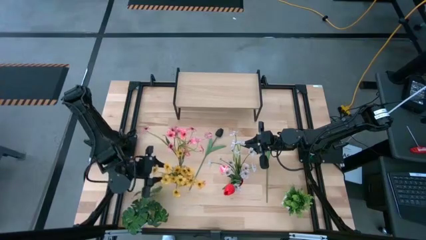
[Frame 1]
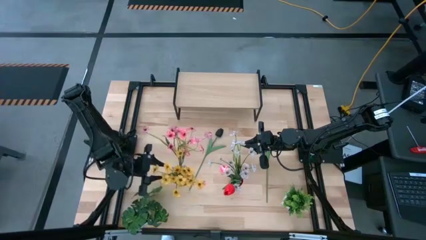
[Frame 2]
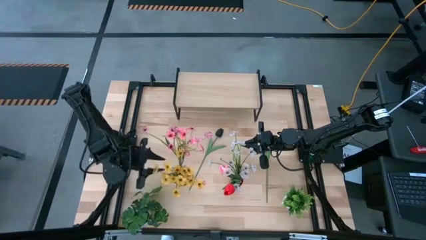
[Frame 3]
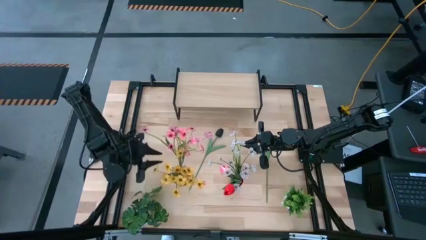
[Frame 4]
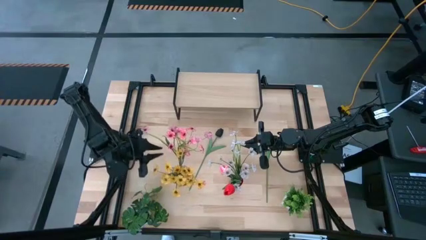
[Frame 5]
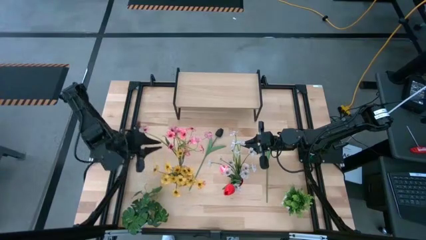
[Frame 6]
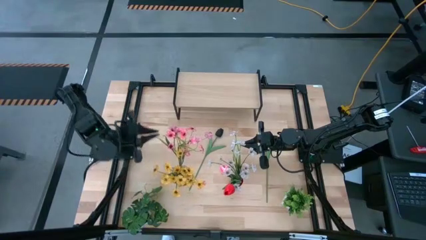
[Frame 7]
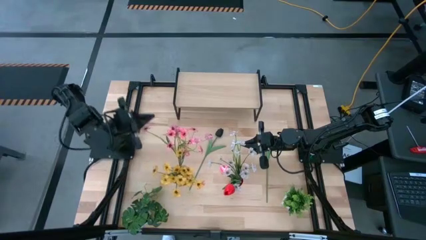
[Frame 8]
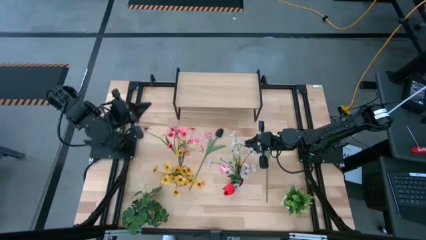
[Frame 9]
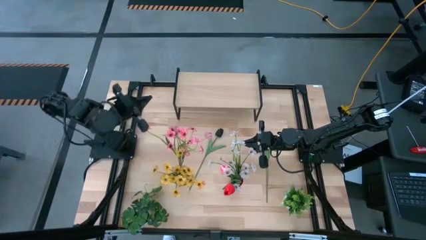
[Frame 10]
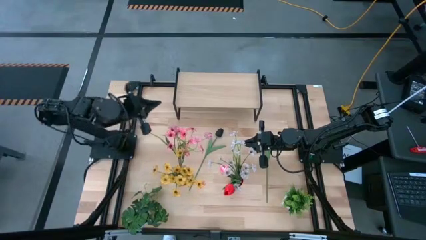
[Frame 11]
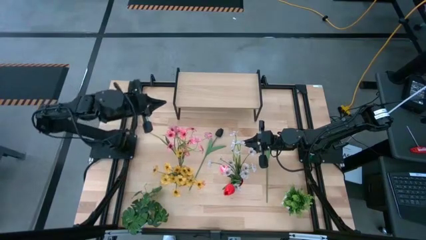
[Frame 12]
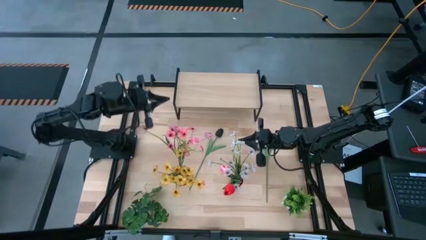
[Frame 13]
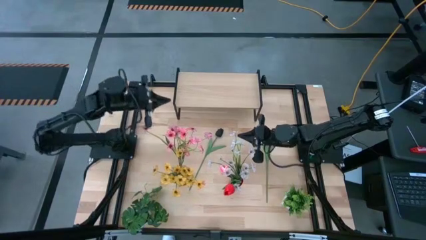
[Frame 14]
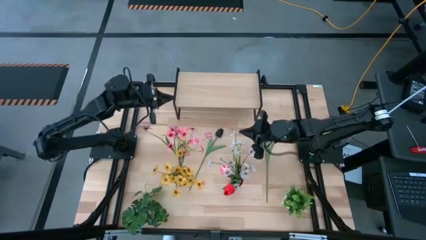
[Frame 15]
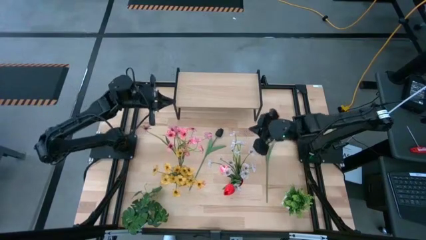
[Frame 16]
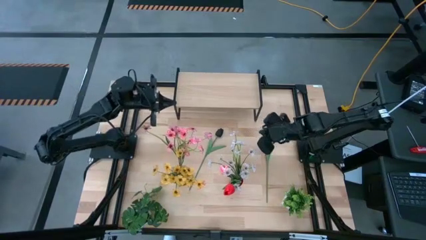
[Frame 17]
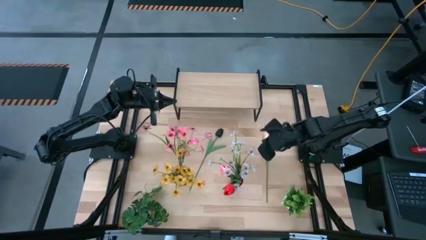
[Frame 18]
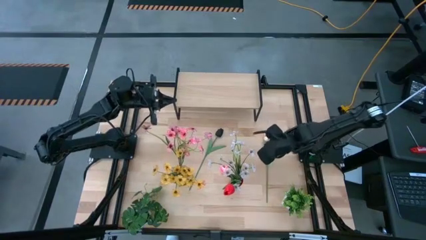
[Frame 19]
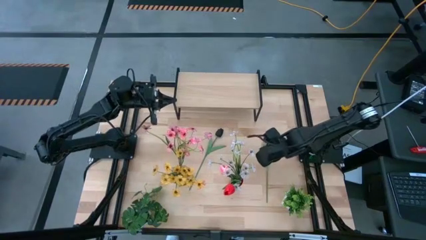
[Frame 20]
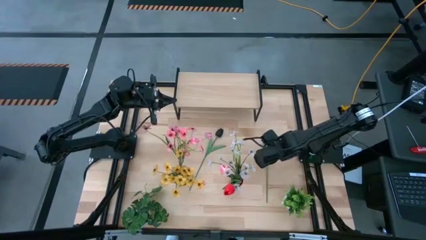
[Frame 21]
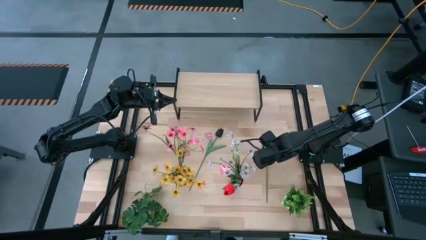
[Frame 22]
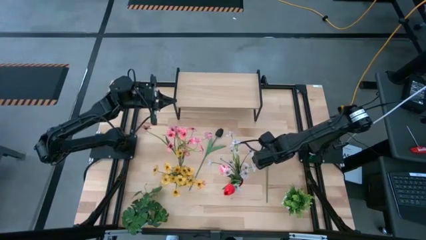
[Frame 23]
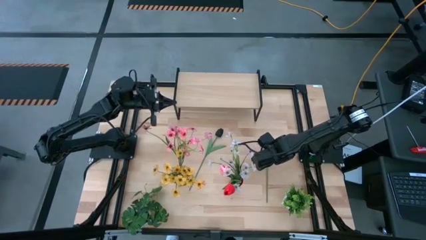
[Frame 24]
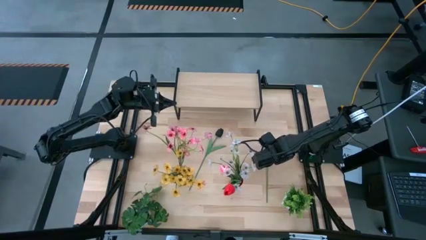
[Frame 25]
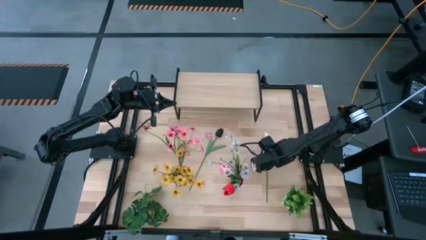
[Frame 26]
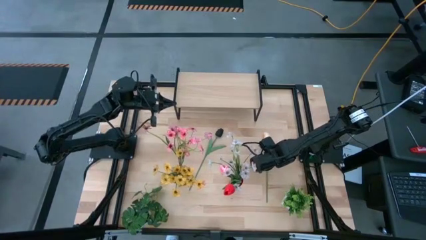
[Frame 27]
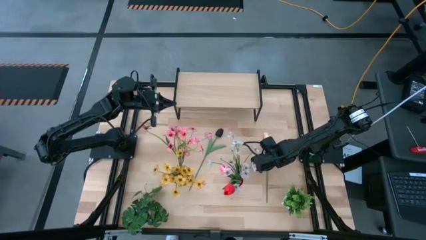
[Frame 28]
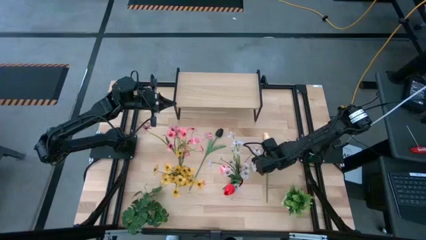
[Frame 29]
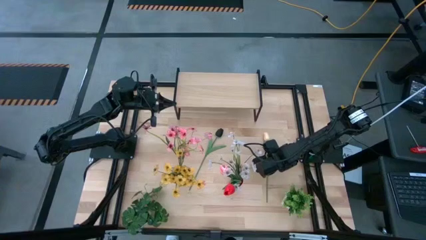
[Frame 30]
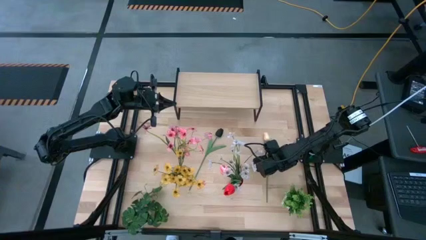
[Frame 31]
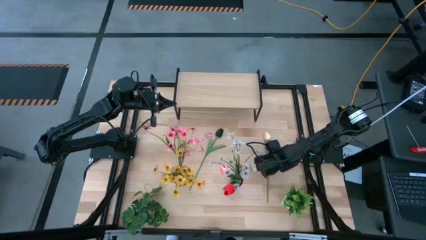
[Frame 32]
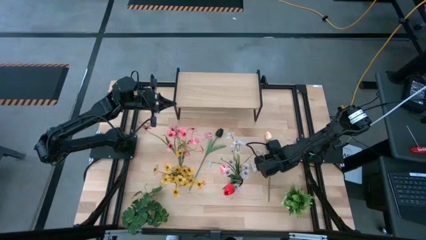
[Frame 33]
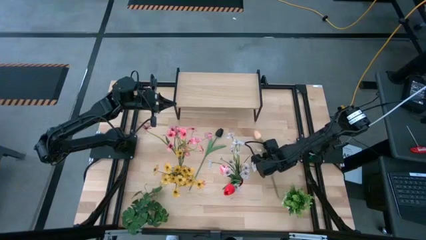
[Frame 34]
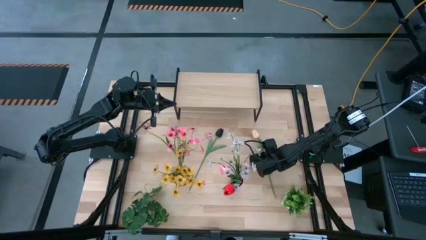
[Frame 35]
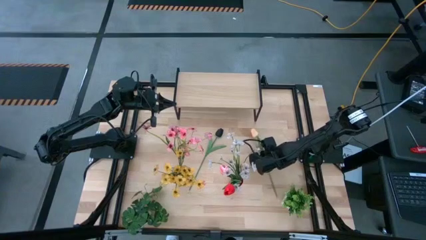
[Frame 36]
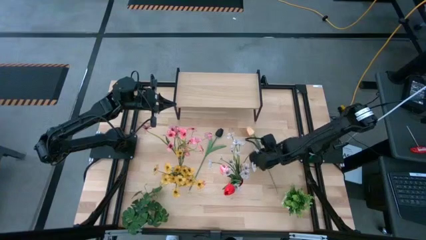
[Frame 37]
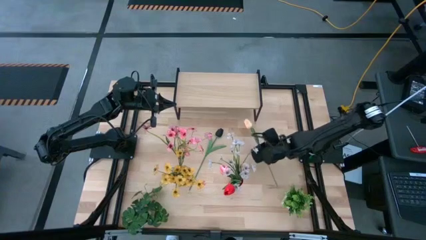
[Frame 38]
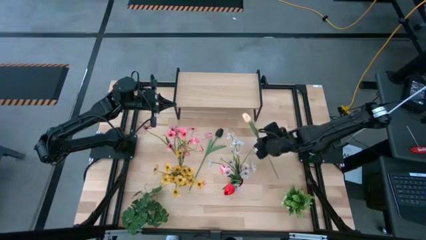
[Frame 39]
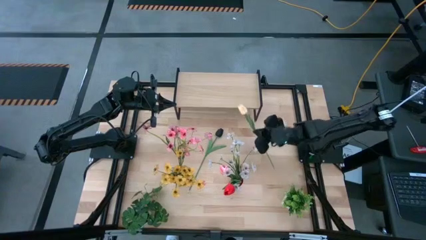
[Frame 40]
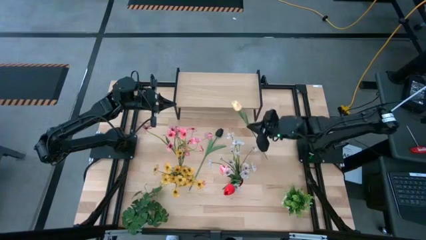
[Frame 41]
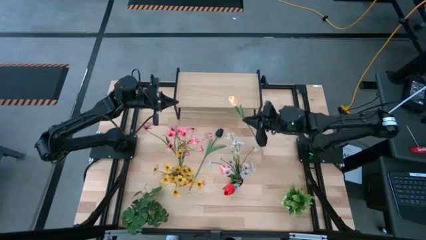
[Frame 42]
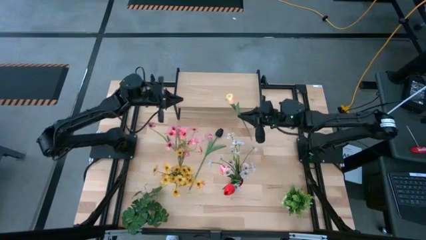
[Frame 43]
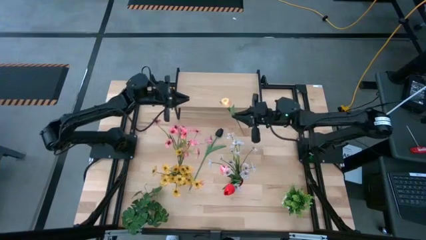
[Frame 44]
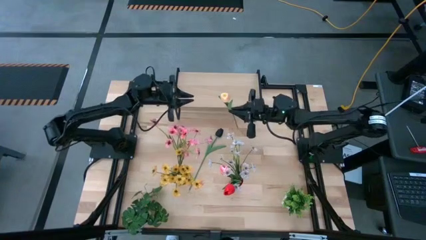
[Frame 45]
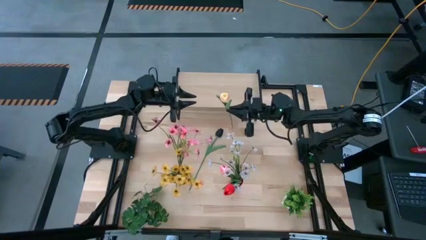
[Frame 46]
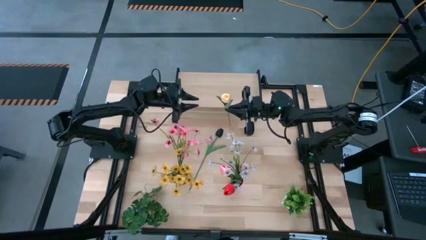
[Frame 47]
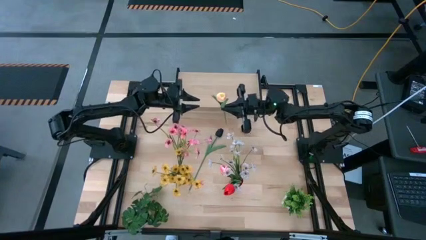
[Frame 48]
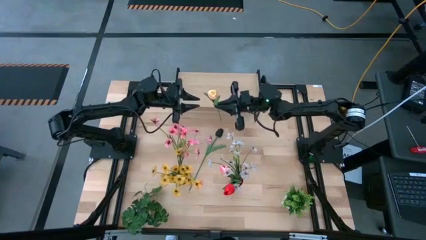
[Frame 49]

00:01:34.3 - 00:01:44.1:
Task: Pick and place flowers into a vace then onto a shelf
Put the white tulip into the transparent vase

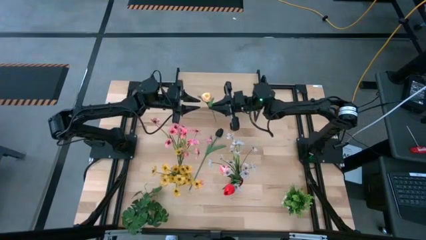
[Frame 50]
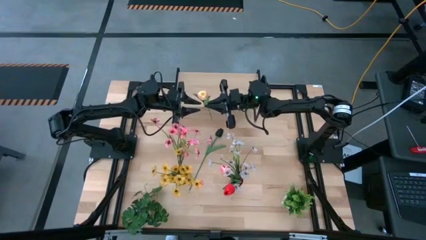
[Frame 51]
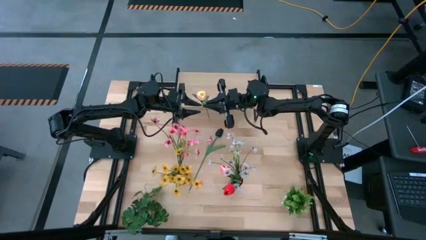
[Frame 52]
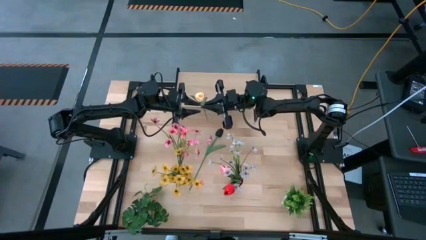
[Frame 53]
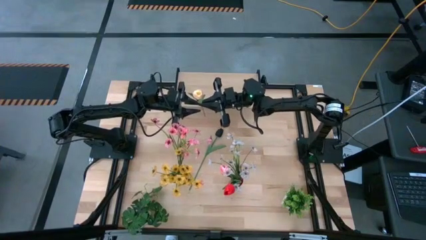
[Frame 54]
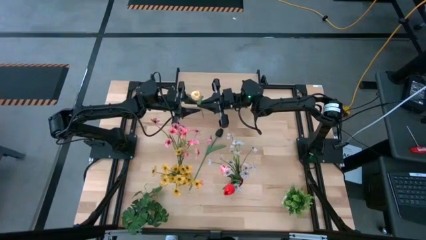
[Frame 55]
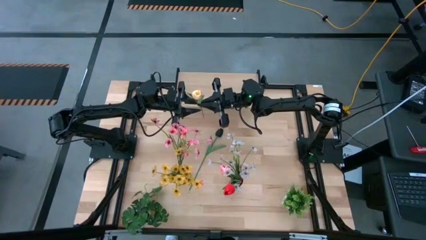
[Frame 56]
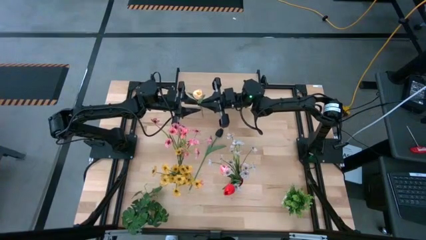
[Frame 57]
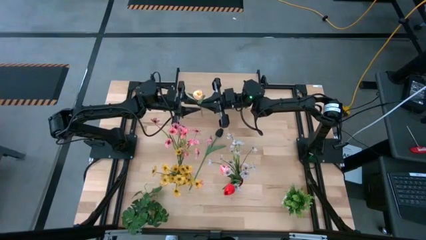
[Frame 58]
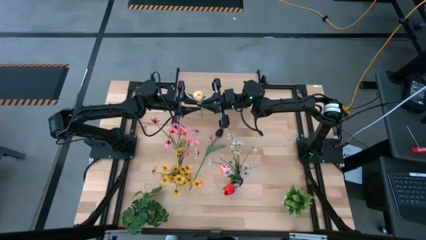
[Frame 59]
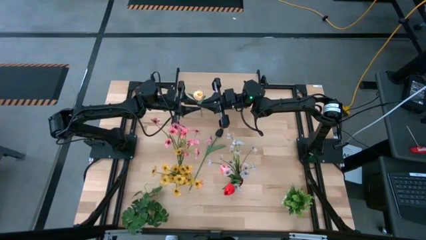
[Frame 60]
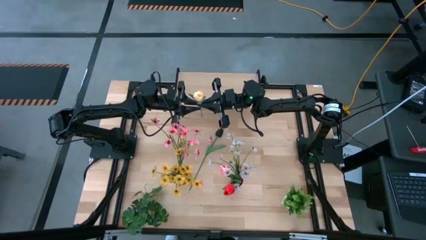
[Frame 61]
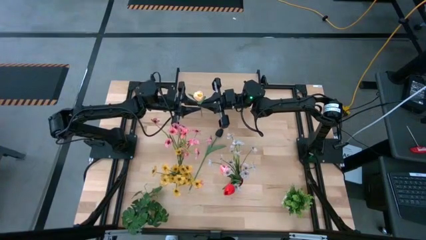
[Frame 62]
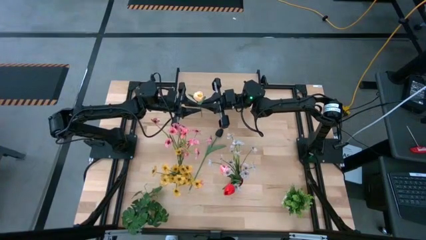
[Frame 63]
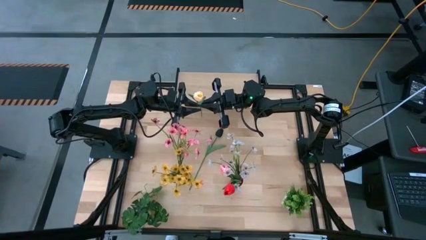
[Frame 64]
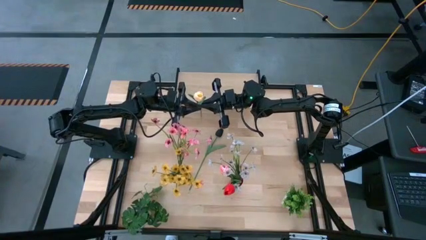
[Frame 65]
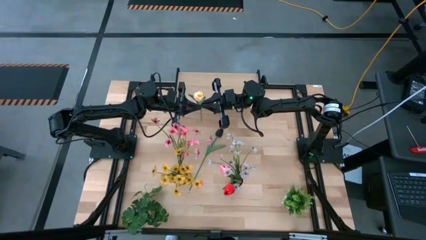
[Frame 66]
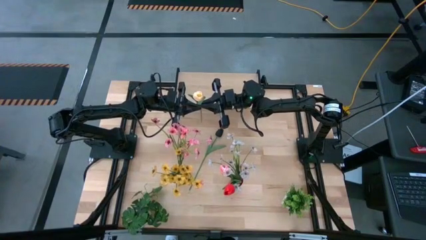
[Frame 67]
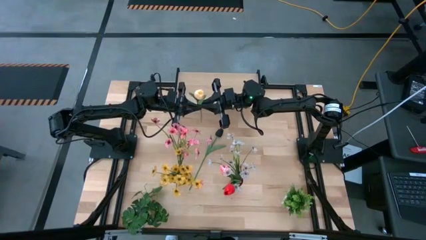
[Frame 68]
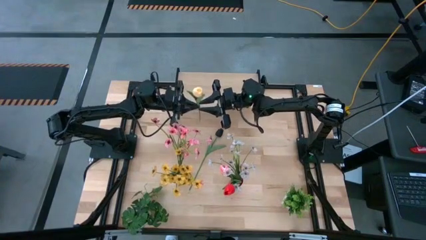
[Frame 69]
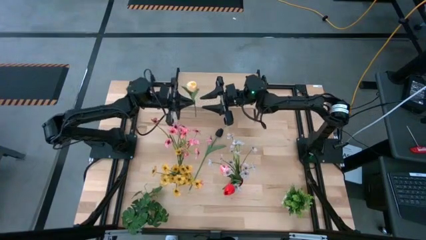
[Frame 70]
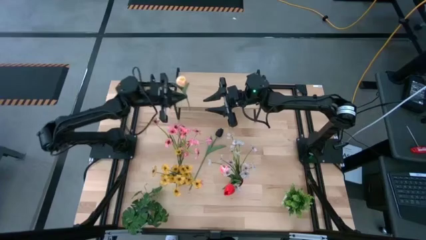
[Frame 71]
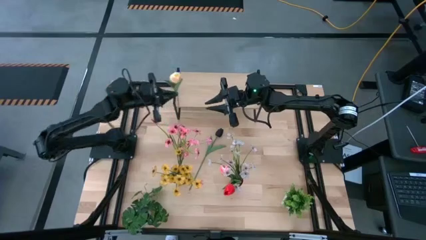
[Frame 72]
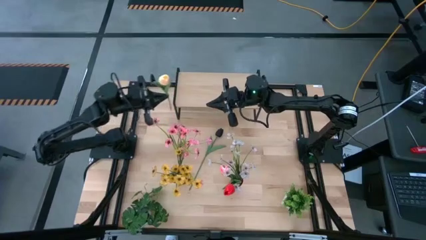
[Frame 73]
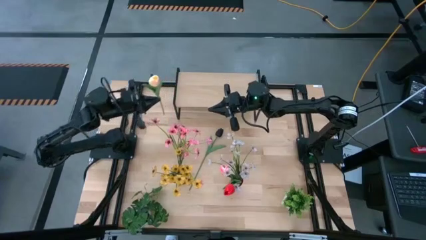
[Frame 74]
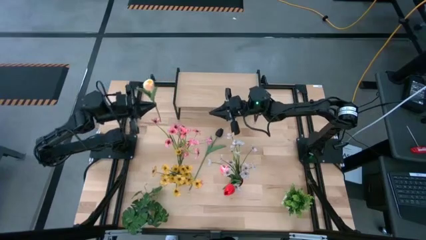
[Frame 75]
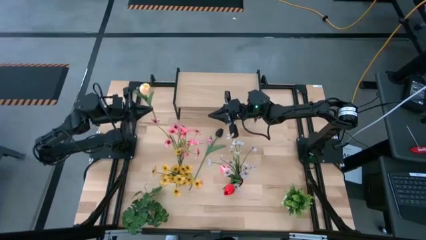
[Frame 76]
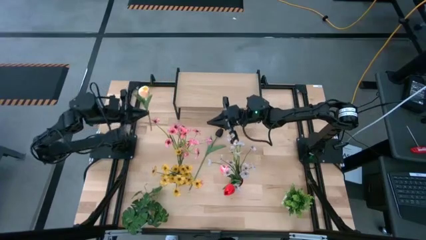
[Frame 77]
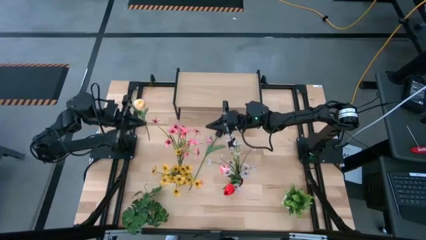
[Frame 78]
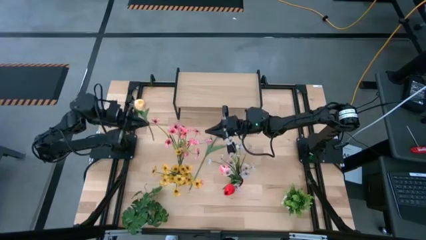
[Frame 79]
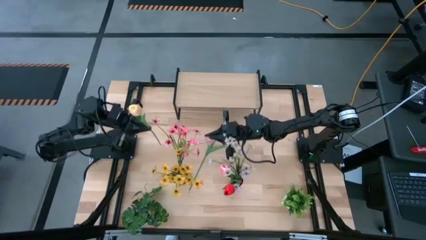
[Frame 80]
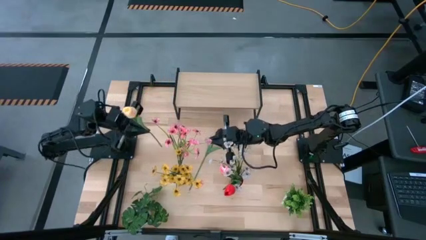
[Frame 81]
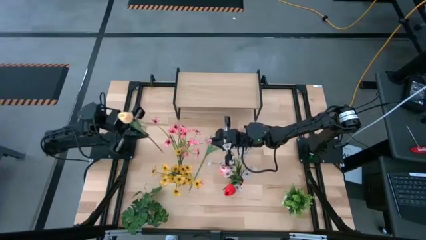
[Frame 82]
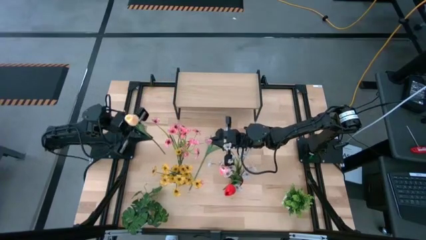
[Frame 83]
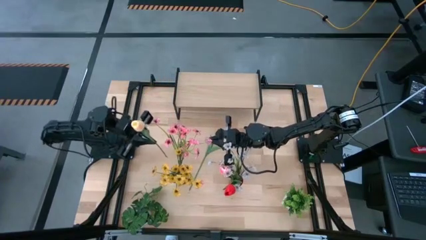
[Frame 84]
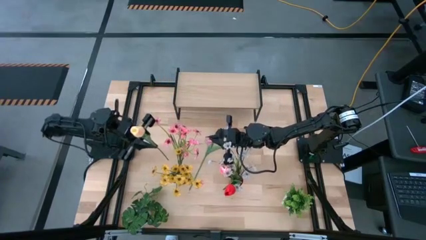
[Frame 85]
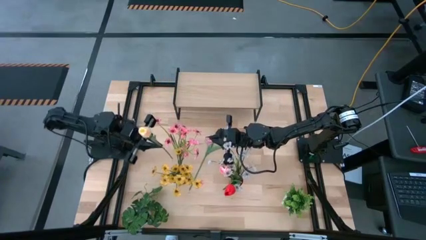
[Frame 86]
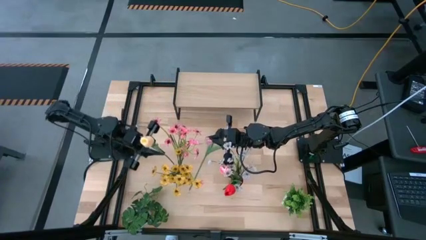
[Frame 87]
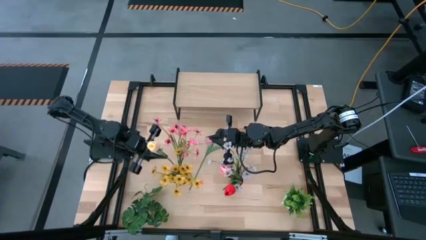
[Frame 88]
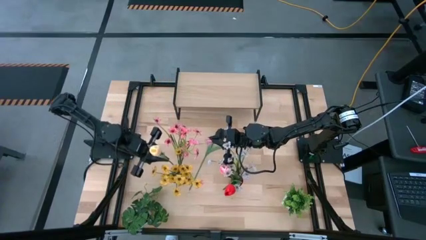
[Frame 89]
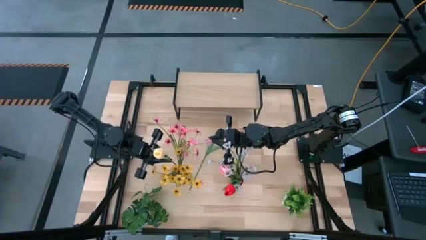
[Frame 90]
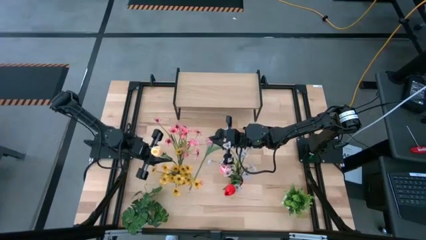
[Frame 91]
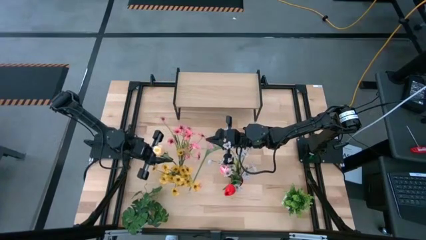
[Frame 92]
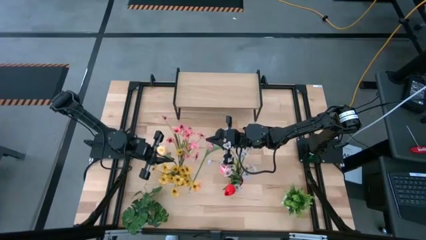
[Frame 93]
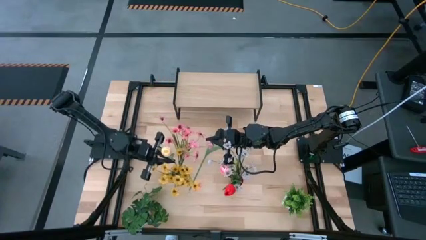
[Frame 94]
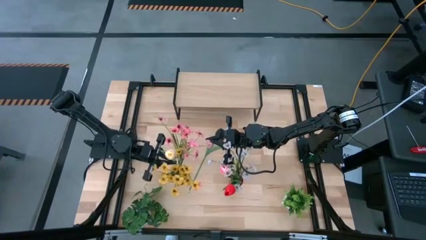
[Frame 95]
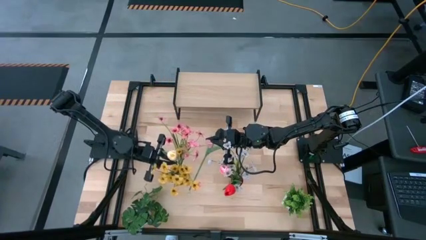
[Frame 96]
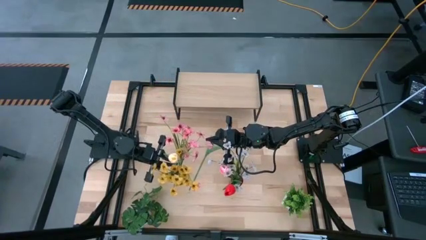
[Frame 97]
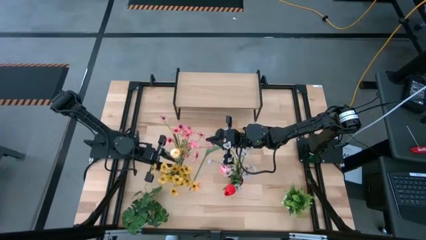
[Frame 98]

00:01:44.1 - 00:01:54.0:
Put the white tulip into the transparent vase
